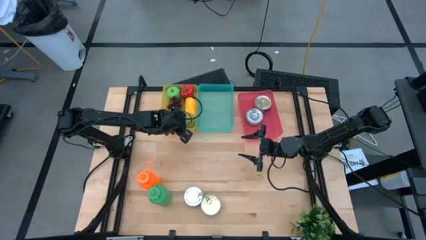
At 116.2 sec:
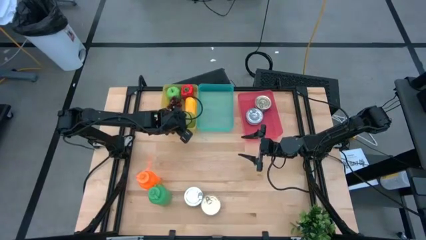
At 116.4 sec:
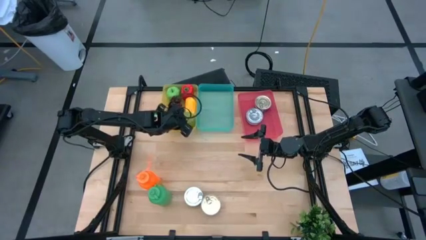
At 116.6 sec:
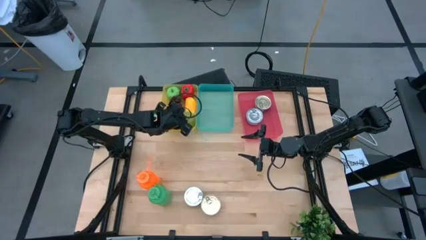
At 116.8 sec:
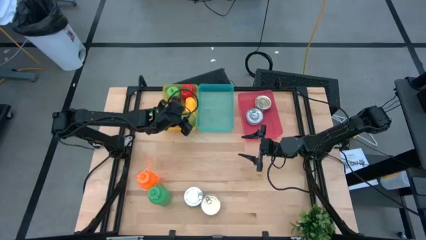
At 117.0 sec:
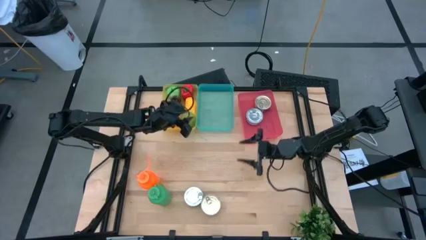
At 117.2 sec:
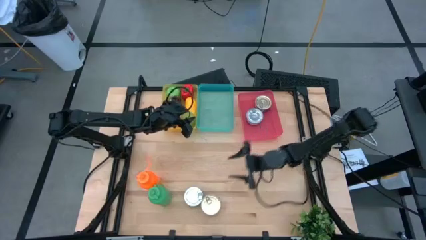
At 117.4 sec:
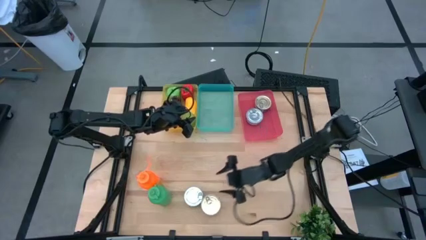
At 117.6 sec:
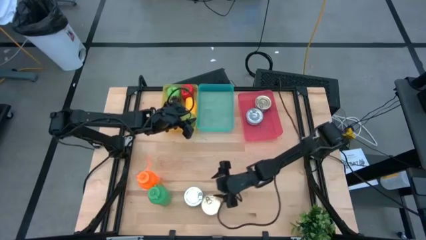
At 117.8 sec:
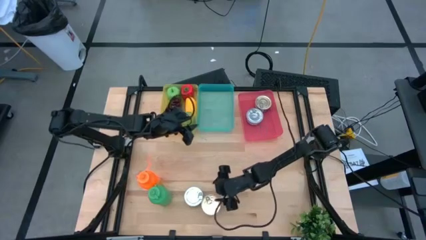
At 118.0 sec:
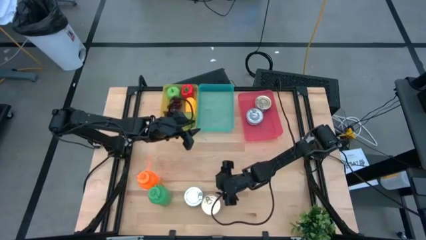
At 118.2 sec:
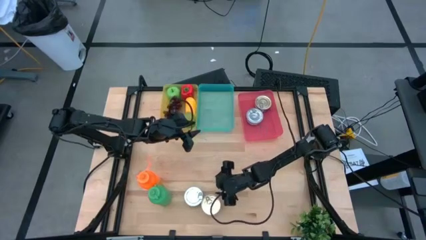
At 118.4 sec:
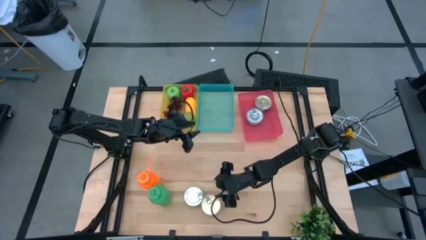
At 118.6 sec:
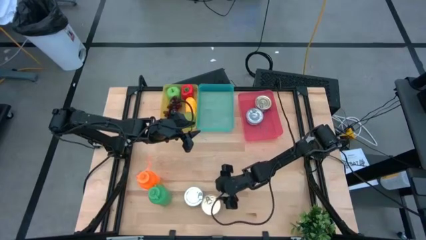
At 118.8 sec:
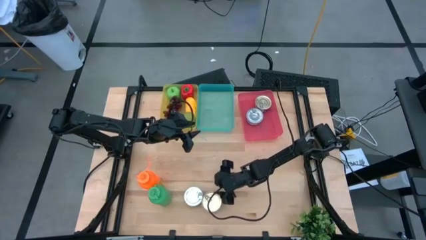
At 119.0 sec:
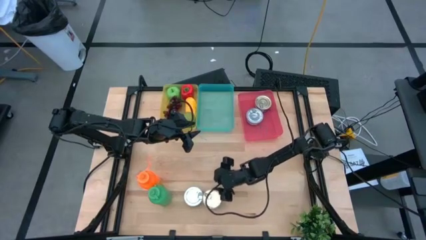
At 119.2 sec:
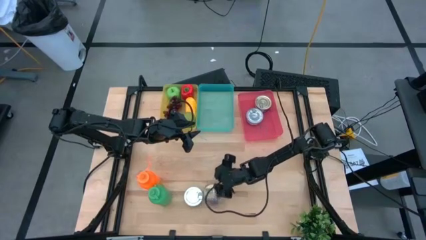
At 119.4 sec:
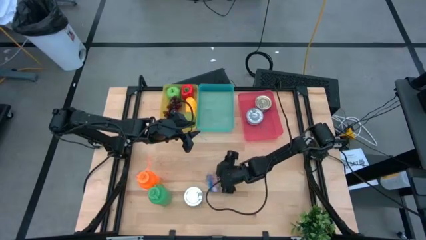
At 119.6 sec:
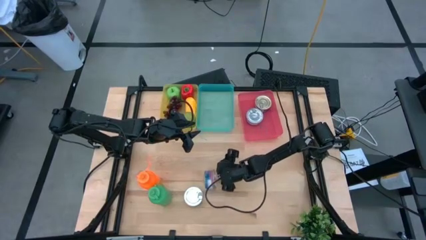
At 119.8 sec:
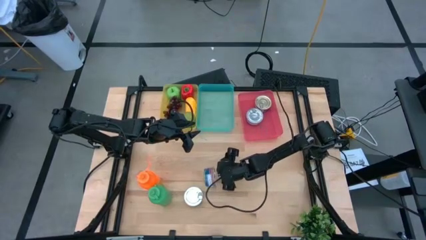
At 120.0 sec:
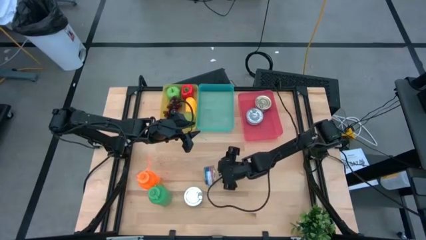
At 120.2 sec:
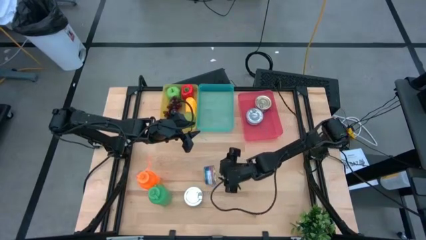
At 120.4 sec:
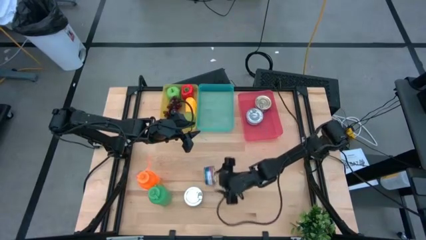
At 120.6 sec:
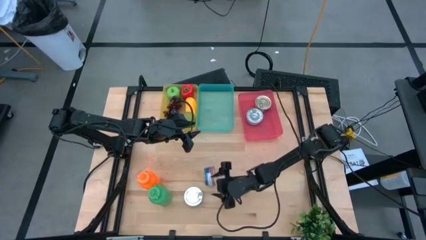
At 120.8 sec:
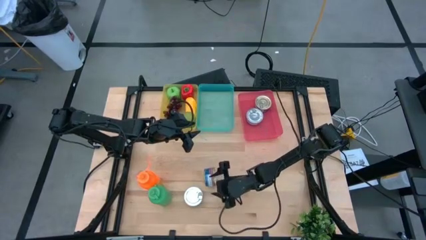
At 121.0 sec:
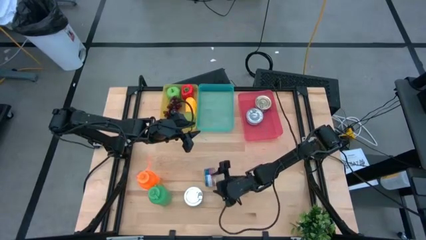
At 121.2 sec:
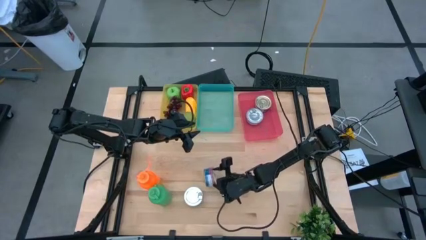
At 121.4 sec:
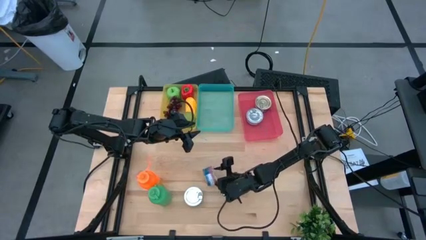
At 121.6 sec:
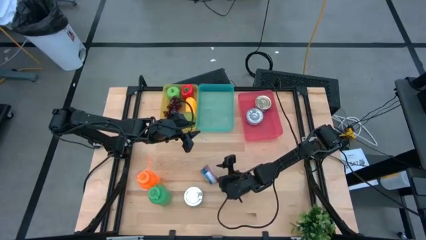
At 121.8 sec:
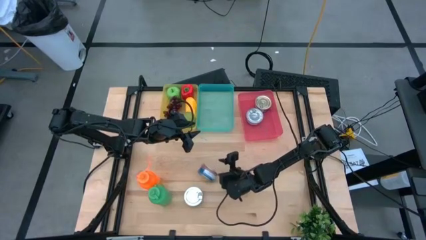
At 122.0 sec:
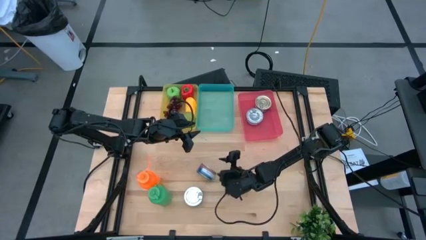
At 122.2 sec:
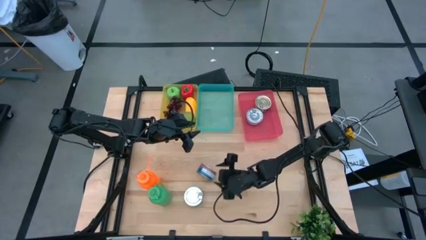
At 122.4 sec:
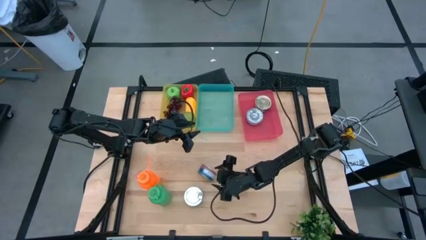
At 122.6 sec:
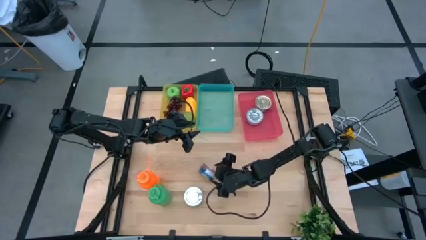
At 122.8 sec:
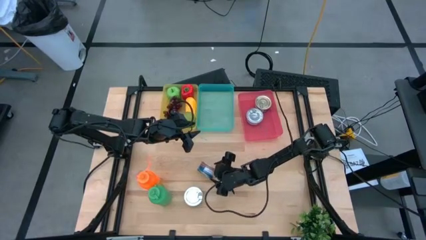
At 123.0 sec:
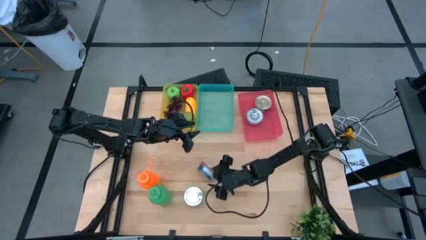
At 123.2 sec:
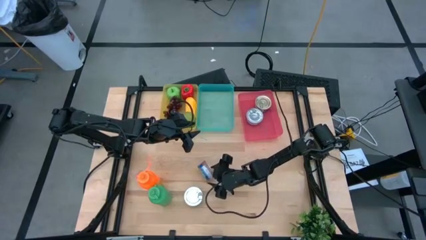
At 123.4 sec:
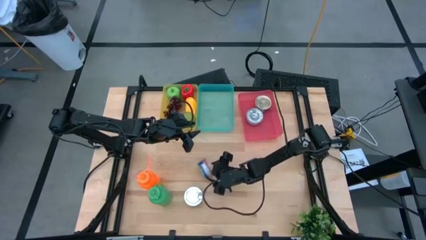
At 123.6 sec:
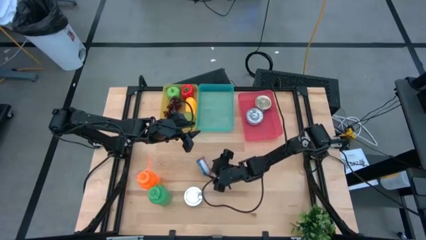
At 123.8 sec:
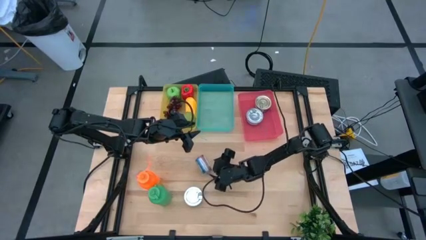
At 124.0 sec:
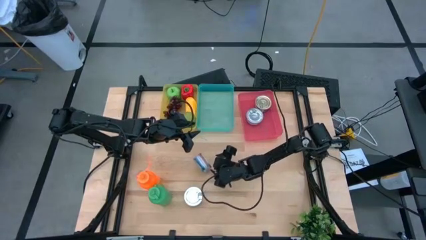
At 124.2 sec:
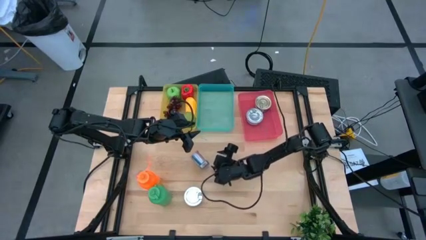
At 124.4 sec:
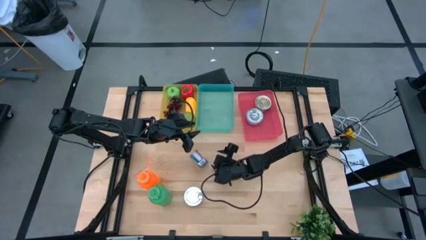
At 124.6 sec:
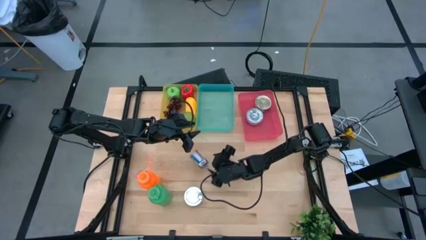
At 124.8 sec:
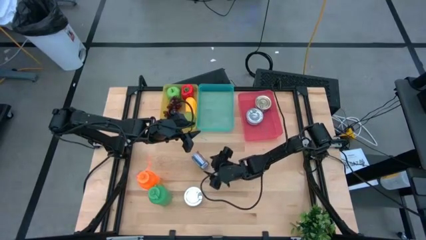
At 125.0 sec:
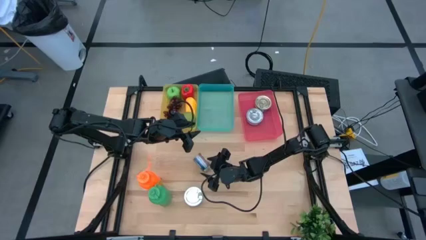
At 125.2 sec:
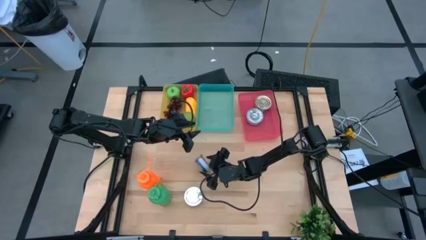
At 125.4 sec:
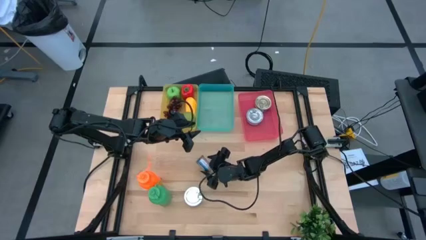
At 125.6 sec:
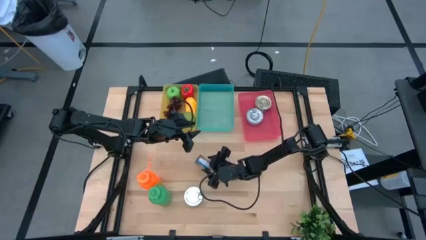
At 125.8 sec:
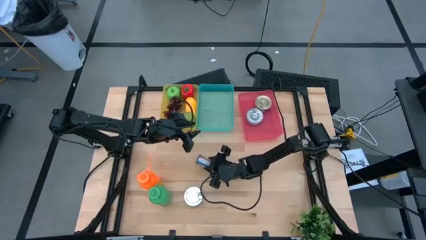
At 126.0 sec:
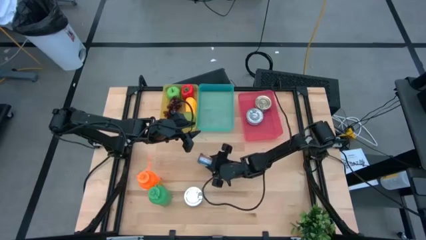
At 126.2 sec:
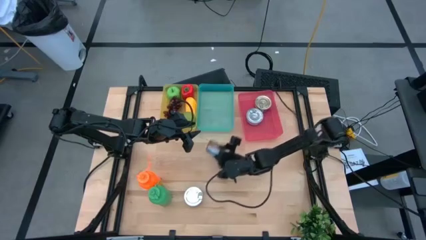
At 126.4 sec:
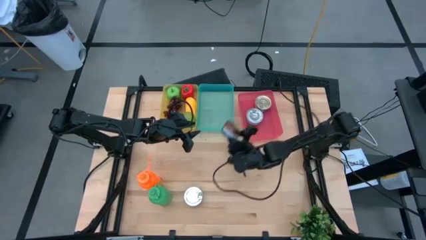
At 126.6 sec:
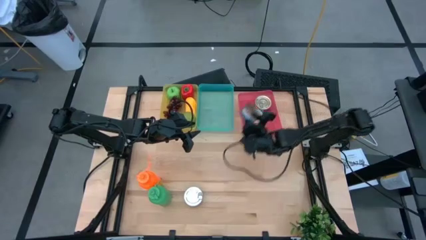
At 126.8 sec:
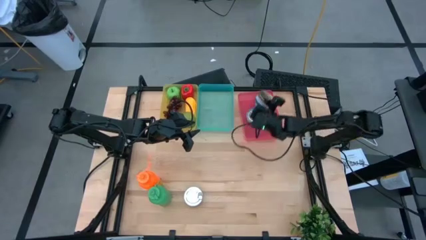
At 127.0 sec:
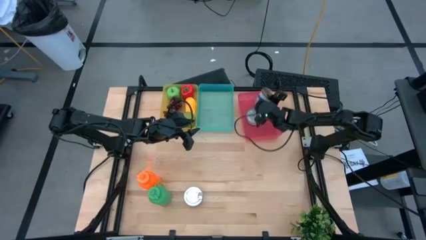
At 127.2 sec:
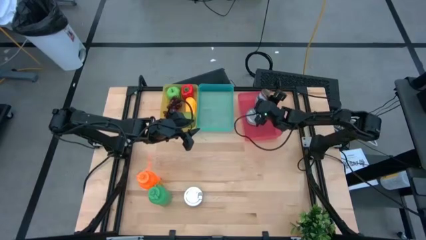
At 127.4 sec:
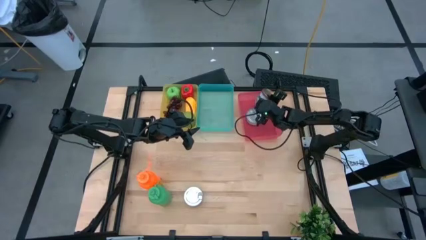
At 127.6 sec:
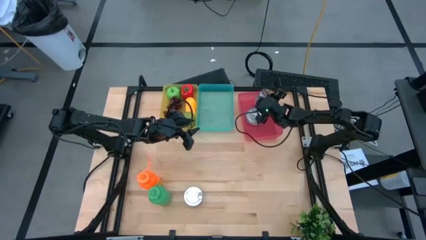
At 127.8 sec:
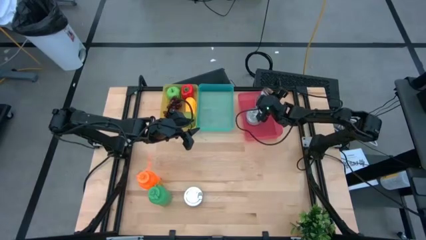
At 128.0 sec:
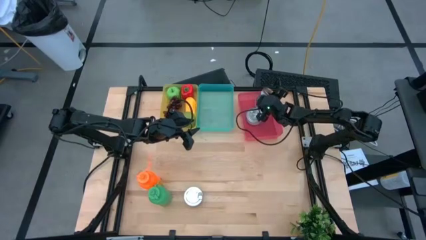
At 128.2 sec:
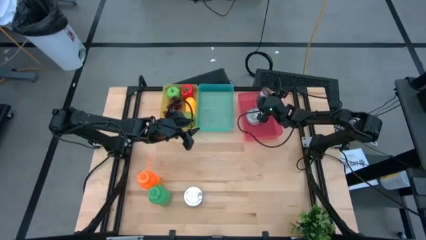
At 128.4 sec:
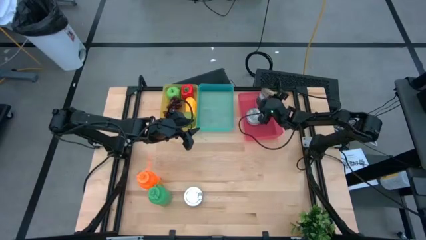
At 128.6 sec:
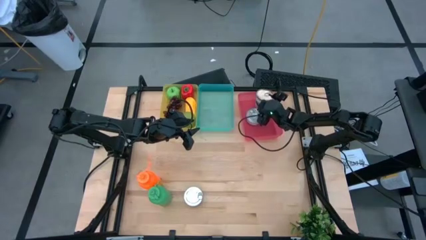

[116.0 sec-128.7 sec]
Task: Pick & Place Food Item
Put the blue pink tuna can into the red bin
